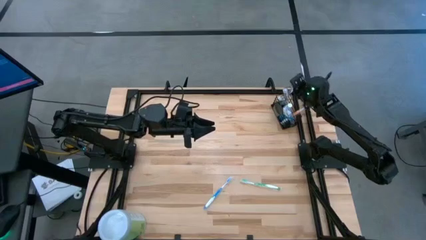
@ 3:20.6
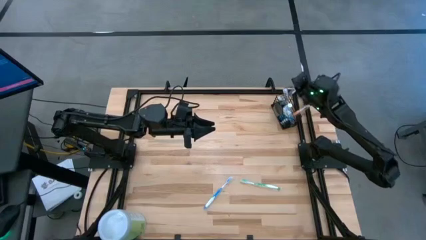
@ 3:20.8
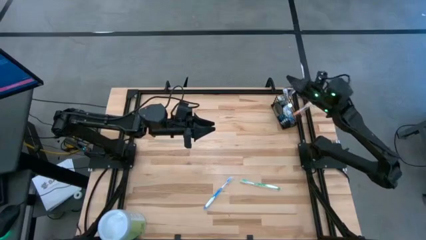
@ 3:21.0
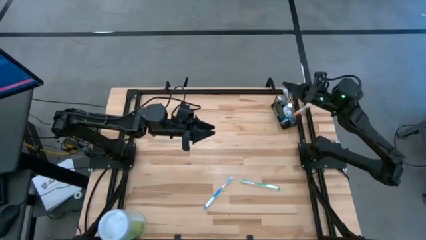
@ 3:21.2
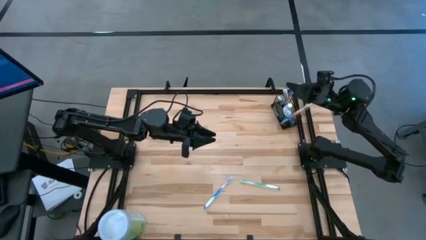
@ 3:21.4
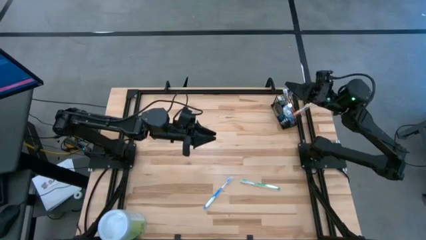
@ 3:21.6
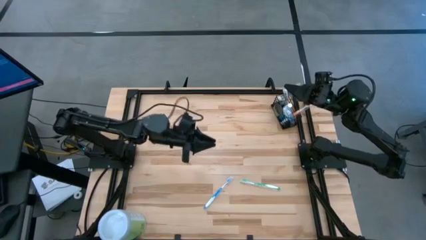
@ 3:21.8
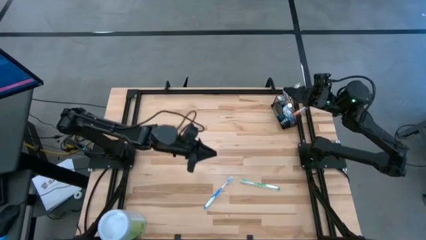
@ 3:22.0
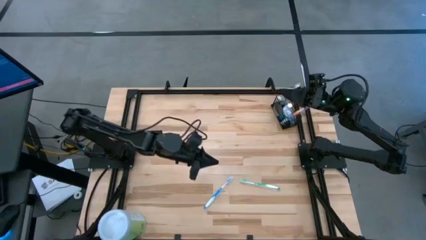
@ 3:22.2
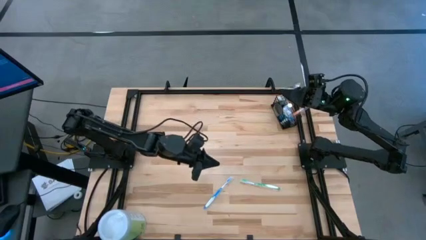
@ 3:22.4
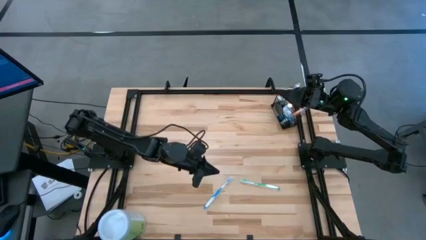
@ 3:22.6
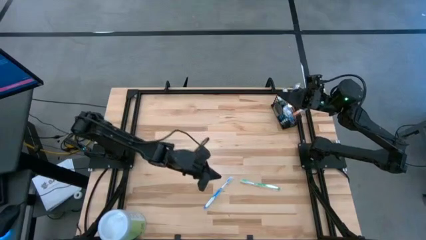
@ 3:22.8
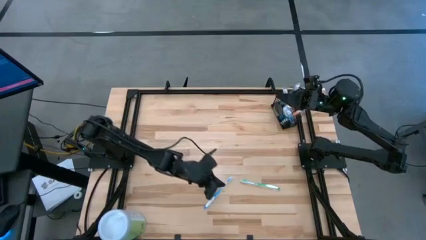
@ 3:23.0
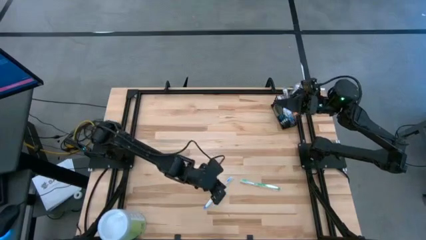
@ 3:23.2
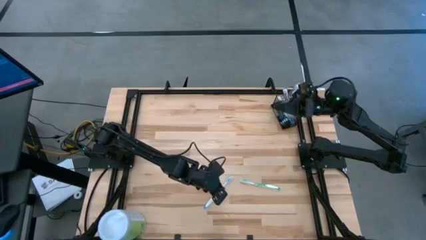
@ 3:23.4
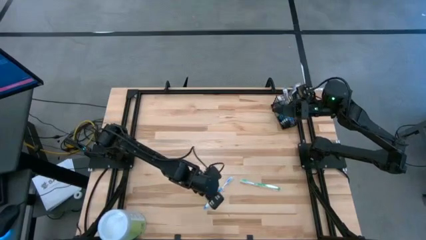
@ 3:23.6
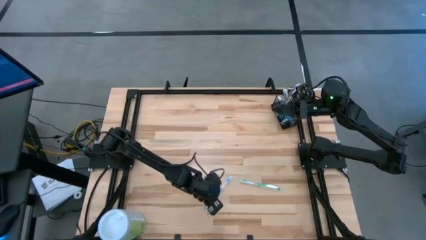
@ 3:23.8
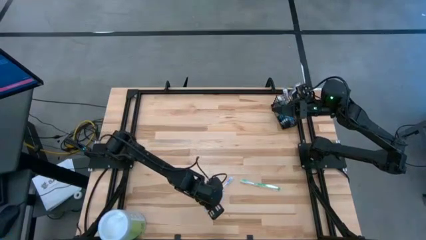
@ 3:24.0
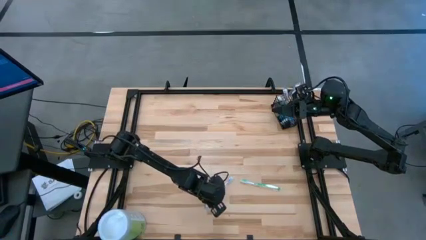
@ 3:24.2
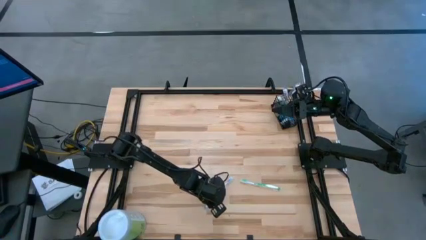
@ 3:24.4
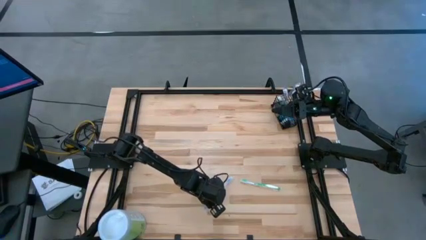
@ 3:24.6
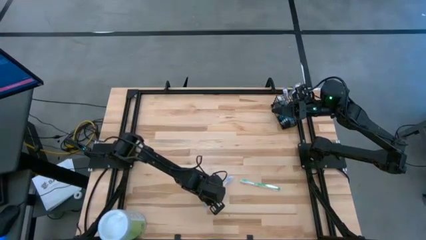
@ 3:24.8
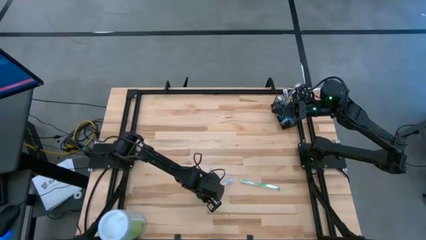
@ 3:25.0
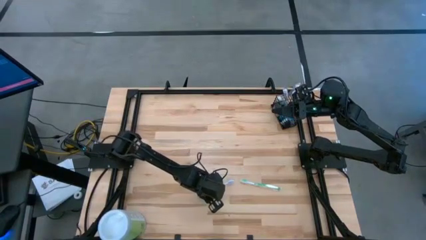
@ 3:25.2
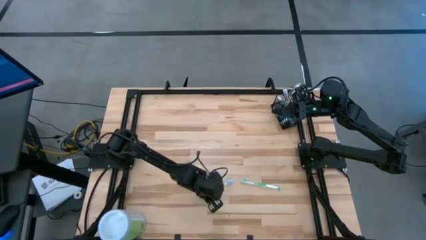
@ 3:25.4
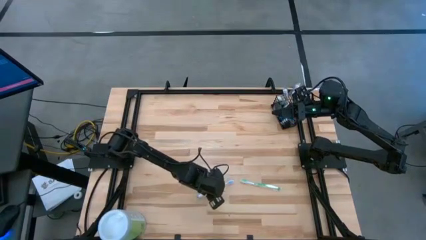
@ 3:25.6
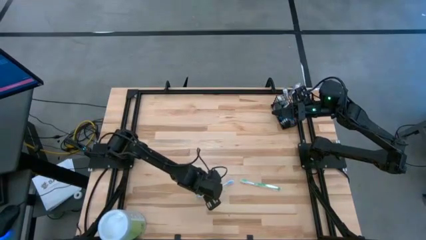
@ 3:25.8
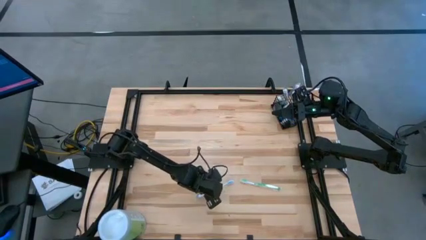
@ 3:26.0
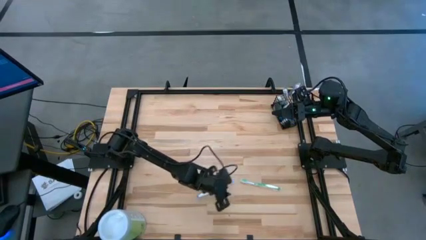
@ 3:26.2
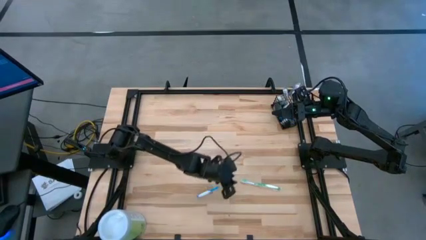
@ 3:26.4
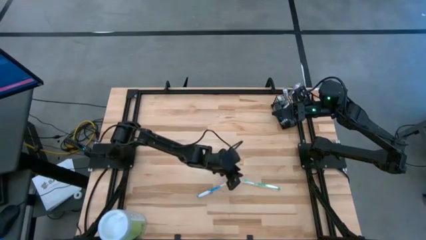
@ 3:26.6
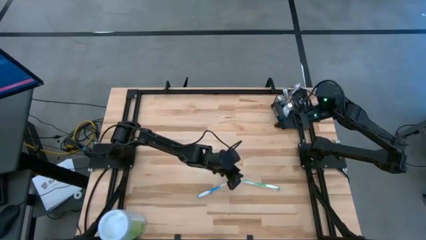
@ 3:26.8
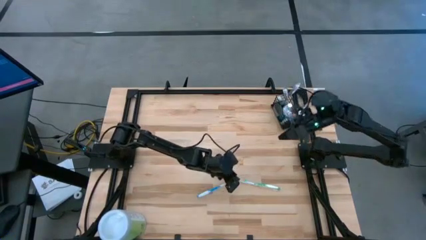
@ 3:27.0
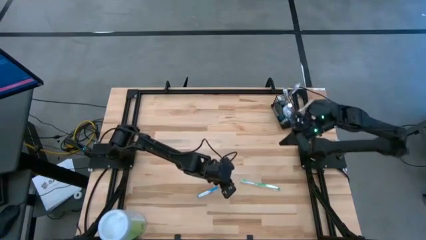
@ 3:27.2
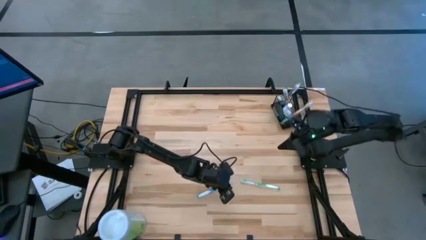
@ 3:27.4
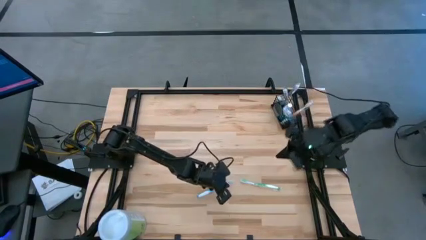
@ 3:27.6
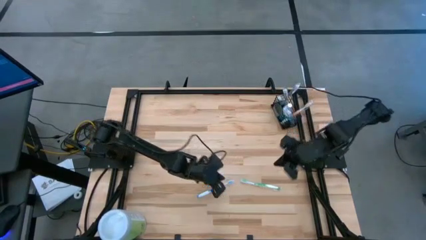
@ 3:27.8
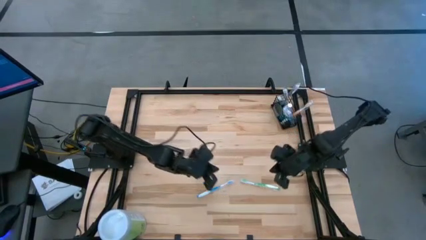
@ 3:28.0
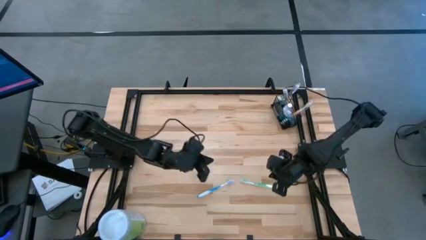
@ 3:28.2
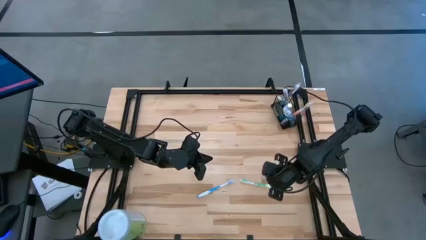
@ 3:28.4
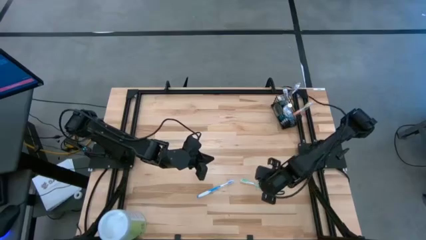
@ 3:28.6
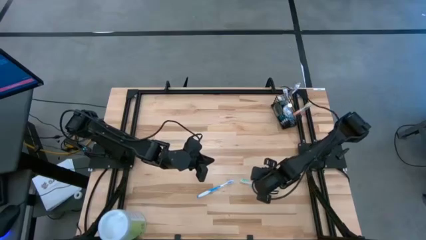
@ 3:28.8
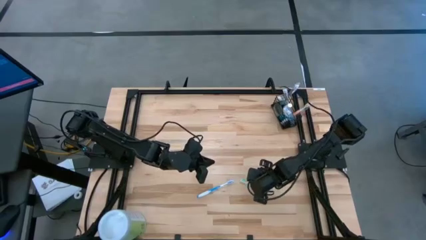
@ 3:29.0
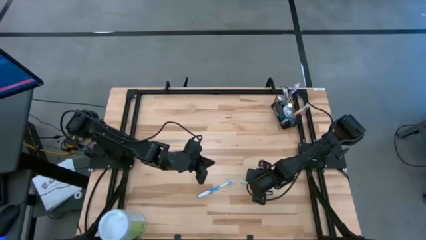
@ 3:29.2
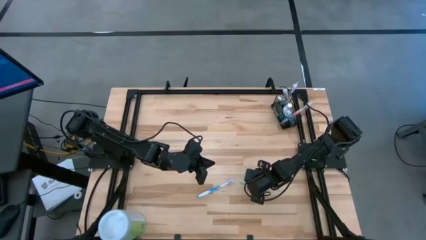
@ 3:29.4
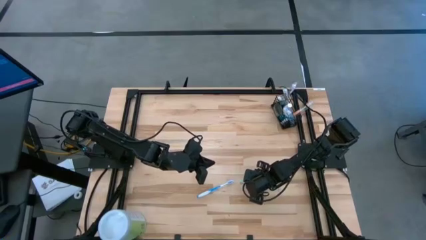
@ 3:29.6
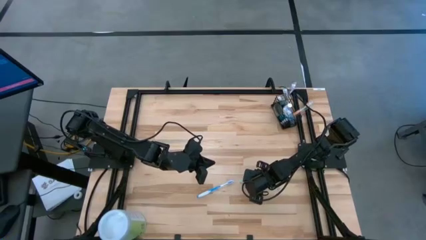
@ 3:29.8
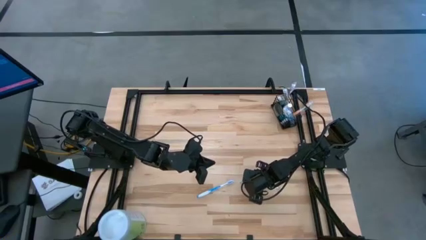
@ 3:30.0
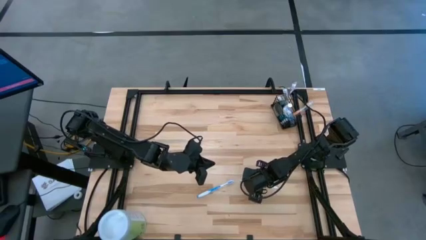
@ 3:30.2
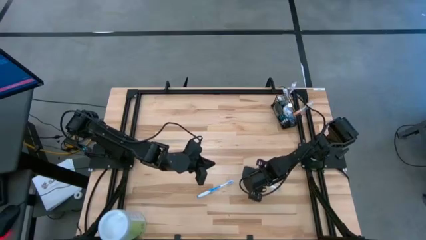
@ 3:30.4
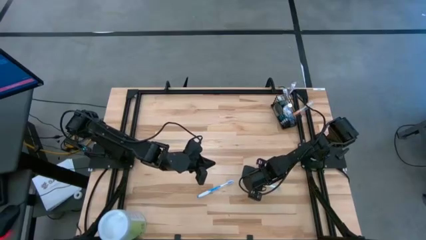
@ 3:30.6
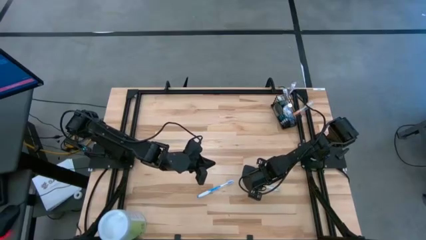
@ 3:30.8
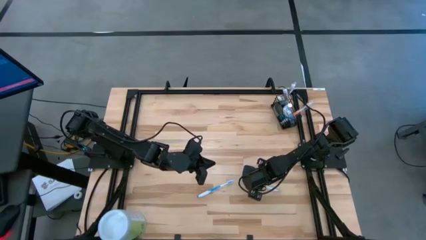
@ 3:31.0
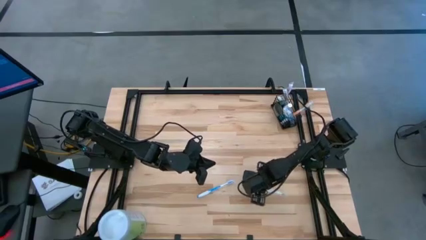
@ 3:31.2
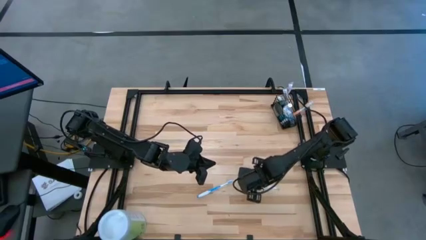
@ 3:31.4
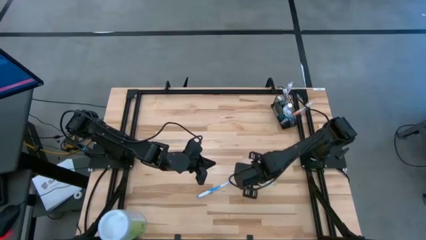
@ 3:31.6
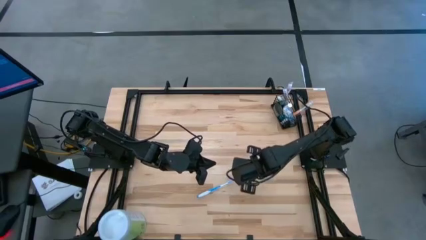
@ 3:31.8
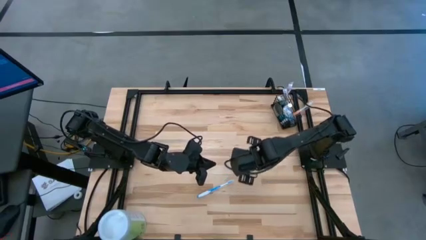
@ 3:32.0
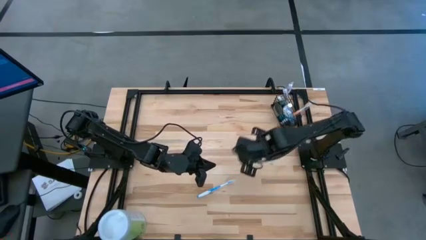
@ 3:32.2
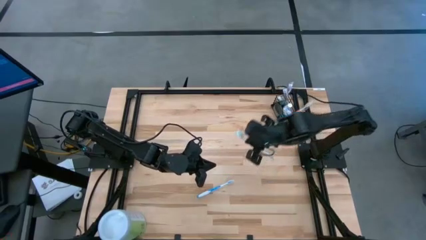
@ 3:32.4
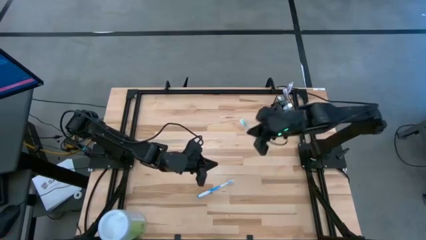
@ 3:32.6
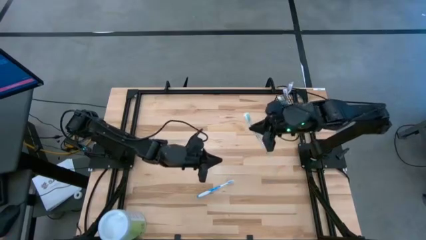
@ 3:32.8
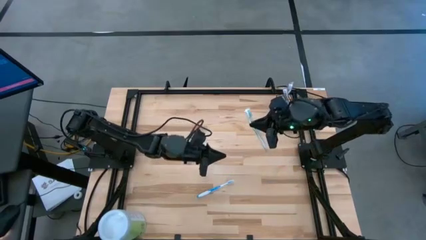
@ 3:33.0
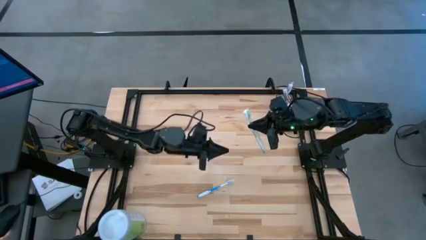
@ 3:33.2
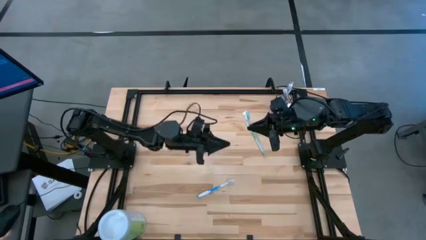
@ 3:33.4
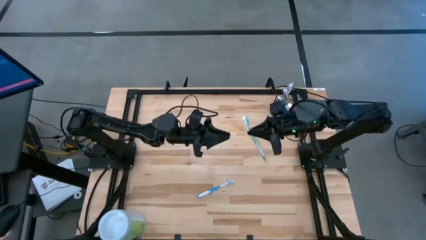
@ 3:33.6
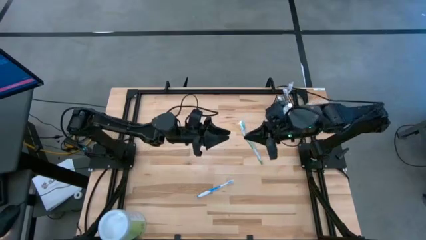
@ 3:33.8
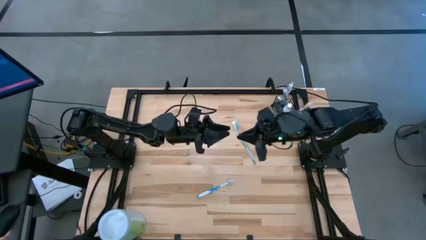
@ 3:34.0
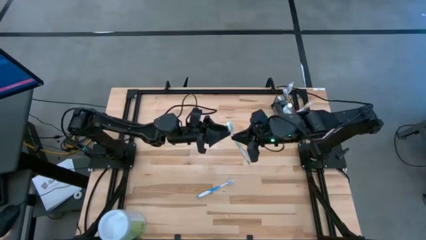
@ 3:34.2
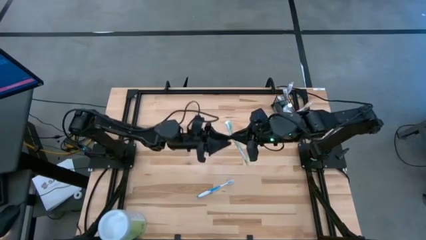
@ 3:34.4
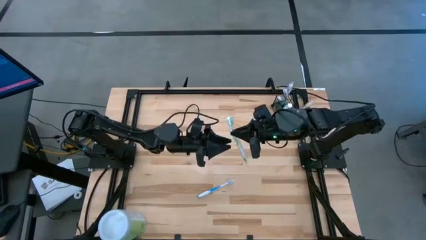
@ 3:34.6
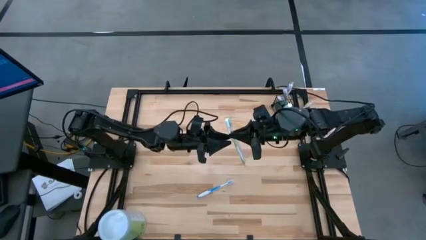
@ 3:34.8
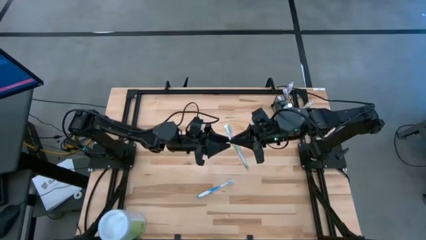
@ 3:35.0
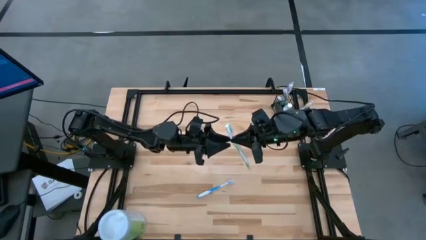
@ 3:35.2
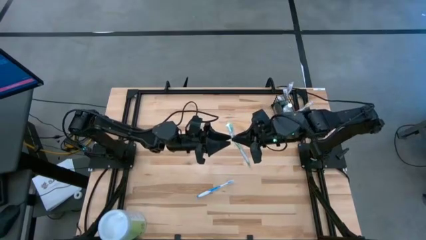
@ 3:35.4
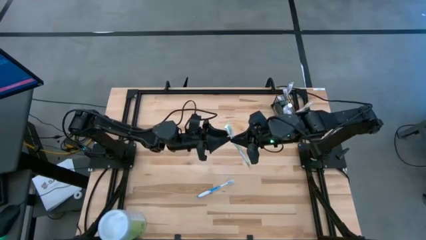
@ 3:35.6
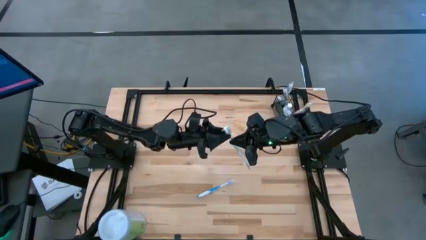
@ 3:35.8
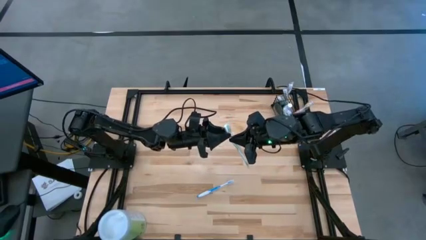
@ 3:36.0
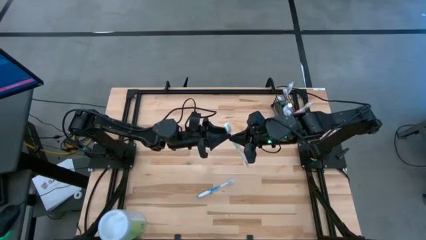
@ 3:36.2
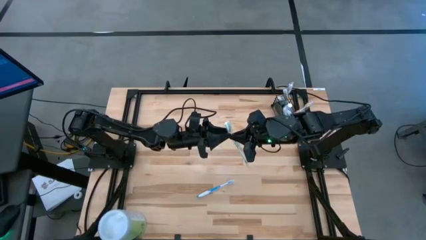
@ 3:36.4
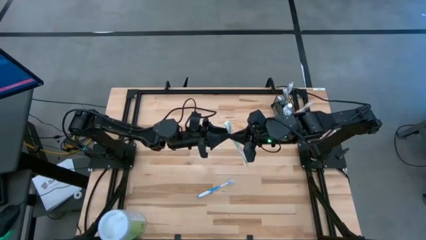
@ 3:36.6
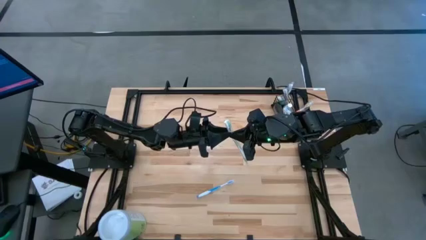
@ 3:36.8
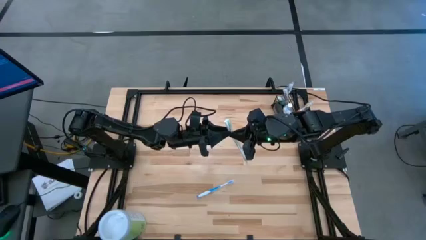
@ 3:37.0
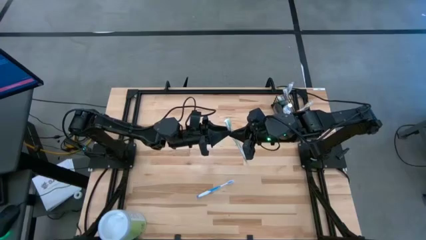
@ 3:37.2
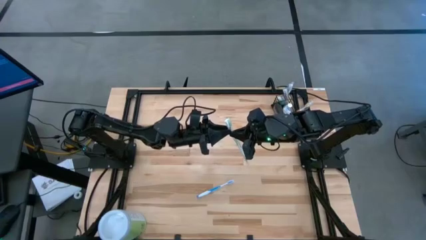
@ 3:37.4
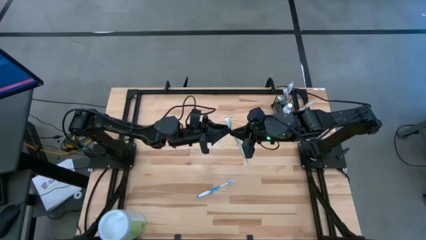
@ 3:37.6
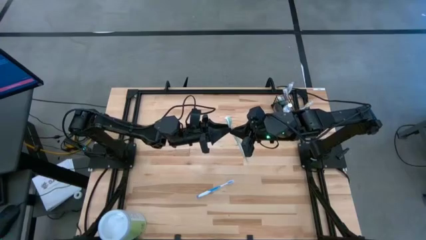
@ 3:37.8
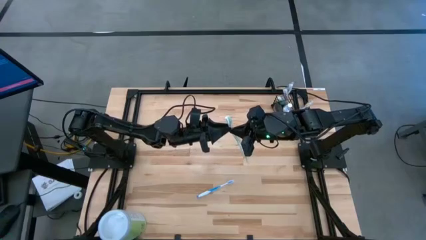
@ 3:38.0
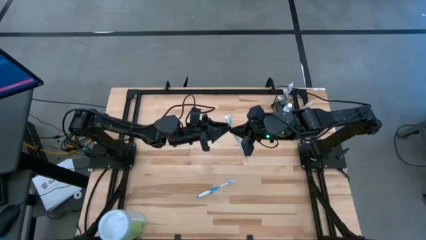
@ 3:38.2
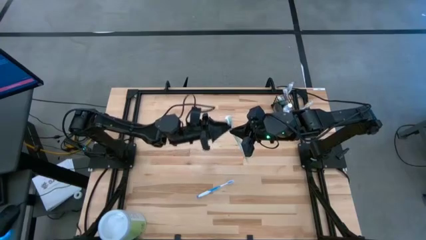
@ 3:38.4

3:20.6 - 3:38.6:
Task: Pick & Place toothbrushing station
Put the green toothbrush in the left section of wire organizer
